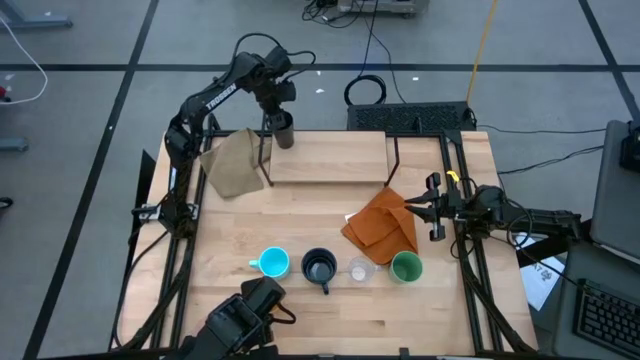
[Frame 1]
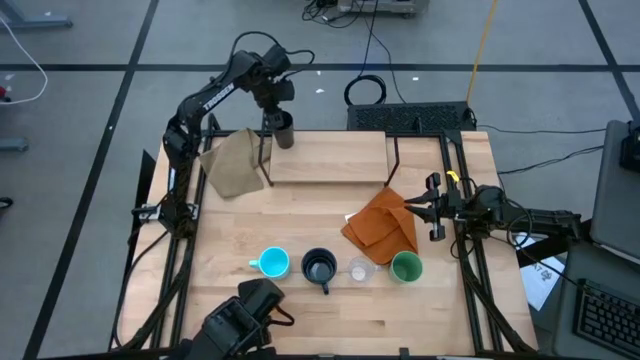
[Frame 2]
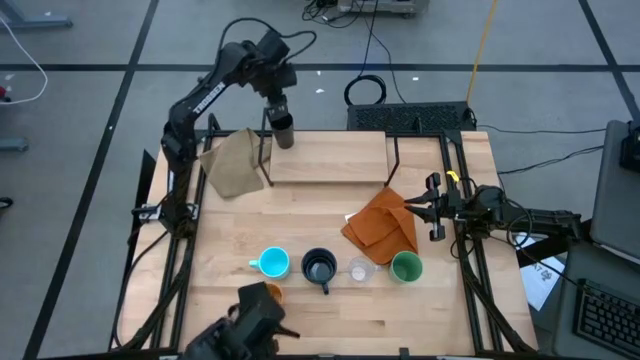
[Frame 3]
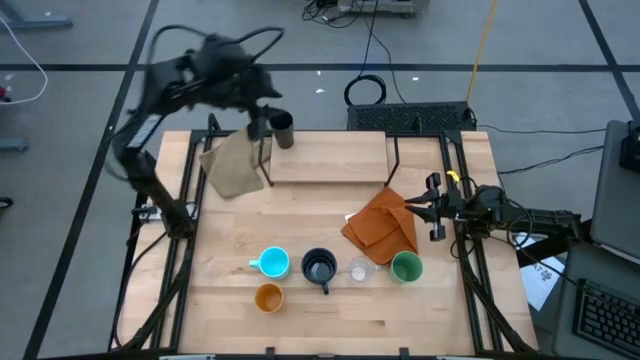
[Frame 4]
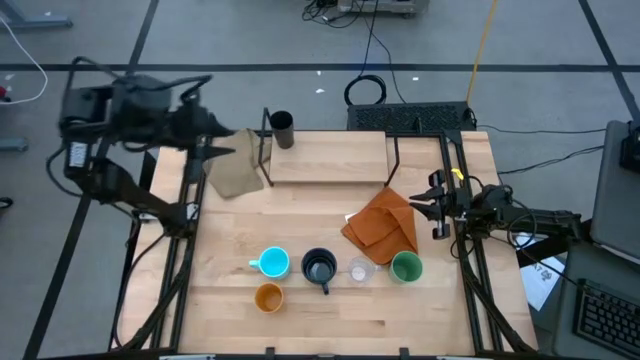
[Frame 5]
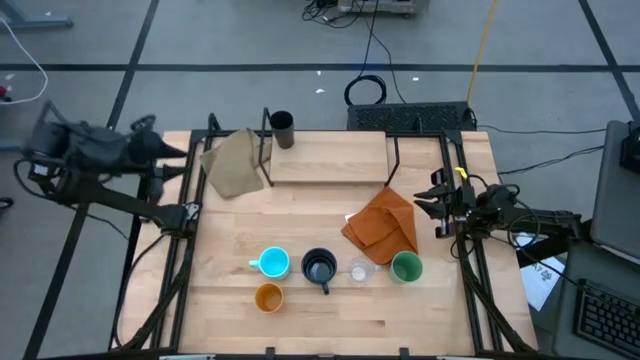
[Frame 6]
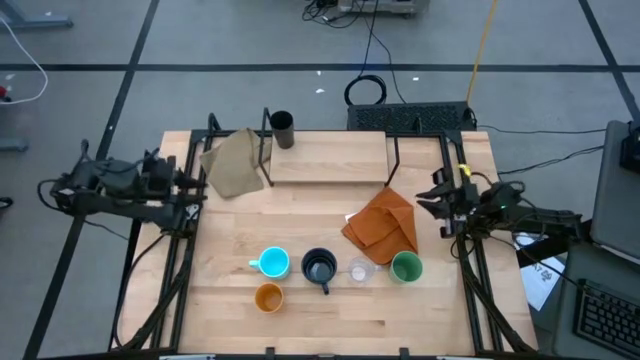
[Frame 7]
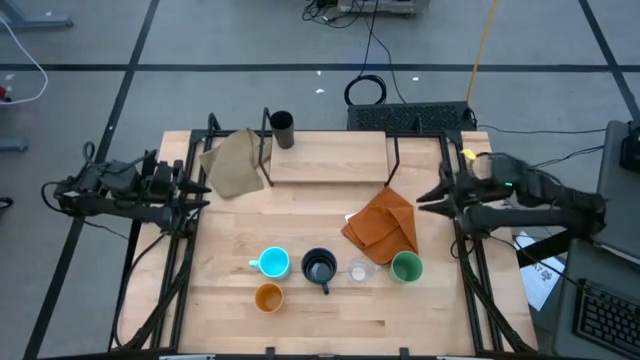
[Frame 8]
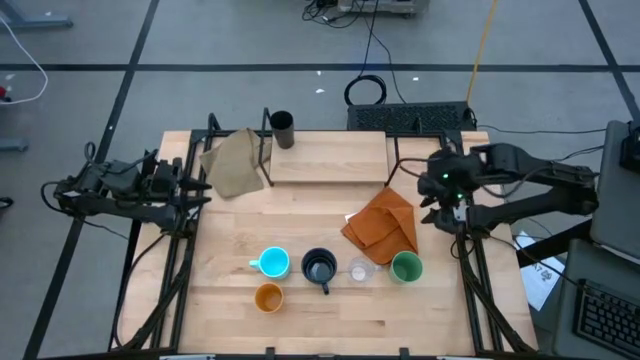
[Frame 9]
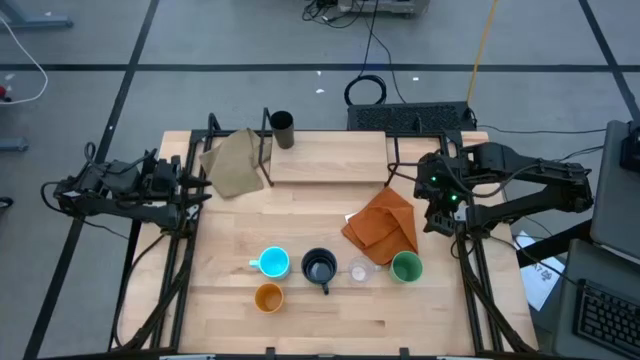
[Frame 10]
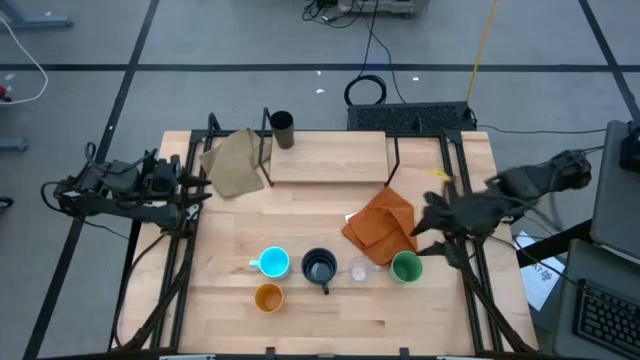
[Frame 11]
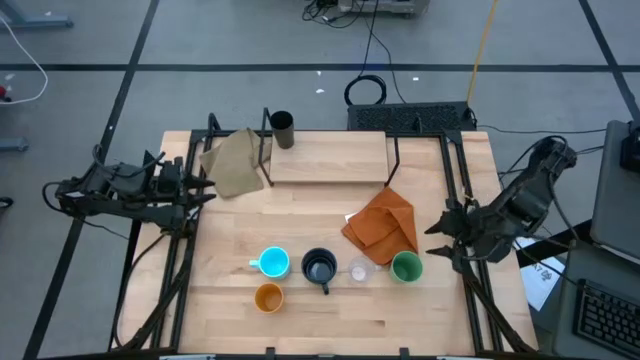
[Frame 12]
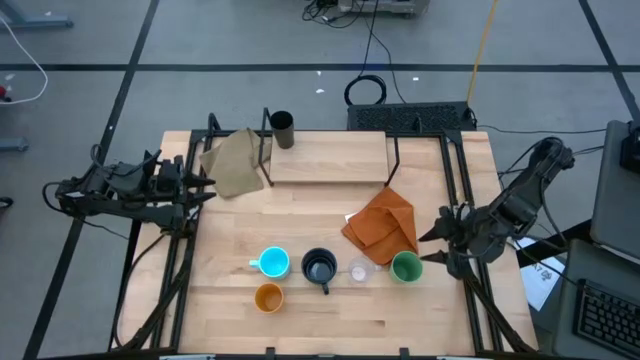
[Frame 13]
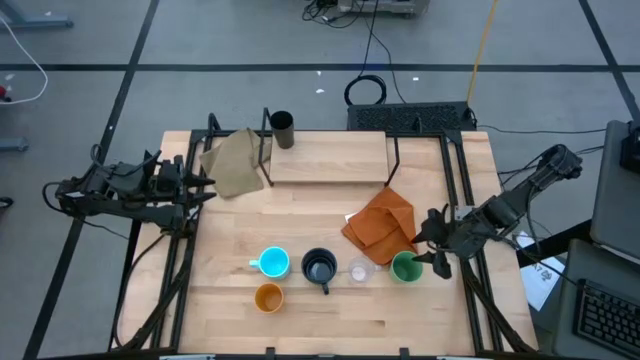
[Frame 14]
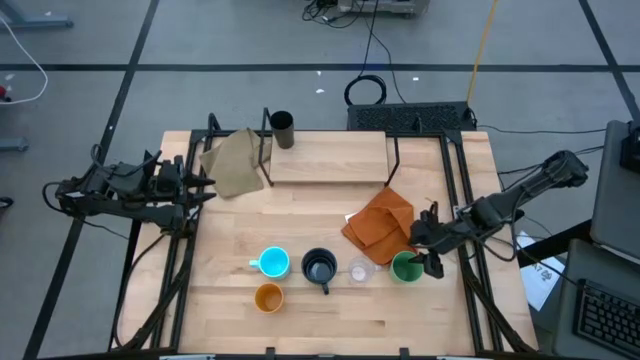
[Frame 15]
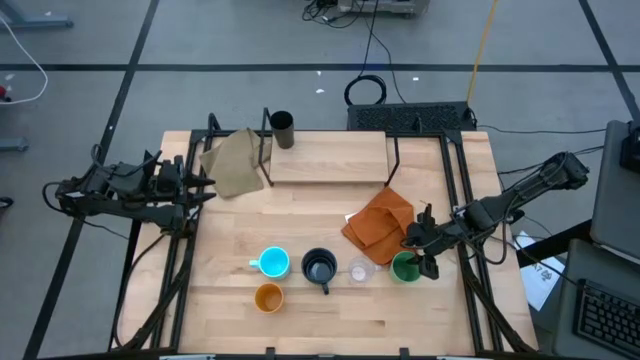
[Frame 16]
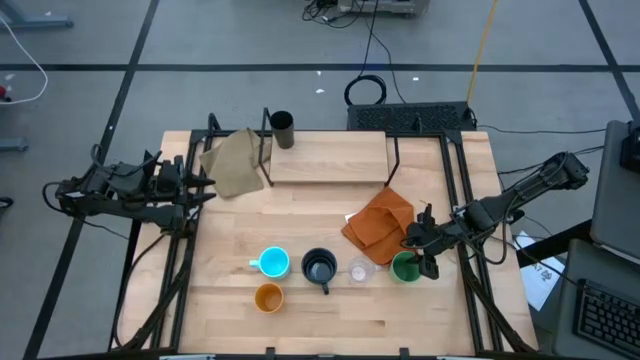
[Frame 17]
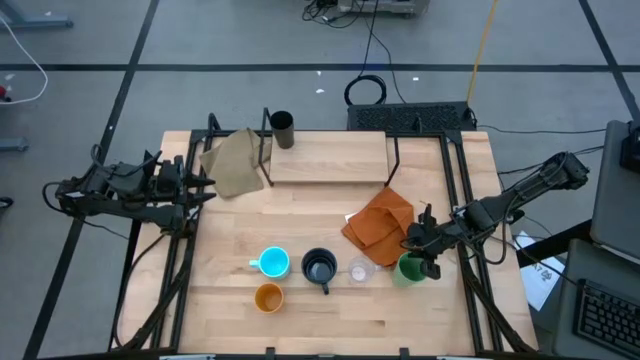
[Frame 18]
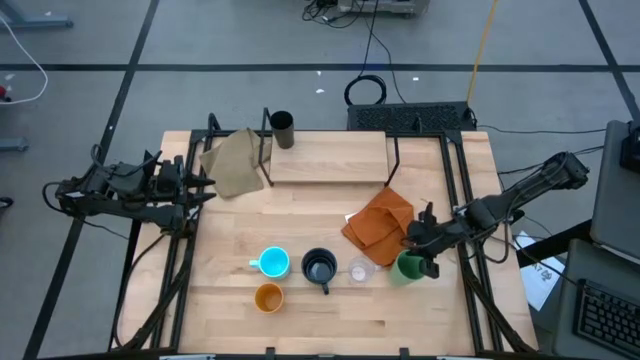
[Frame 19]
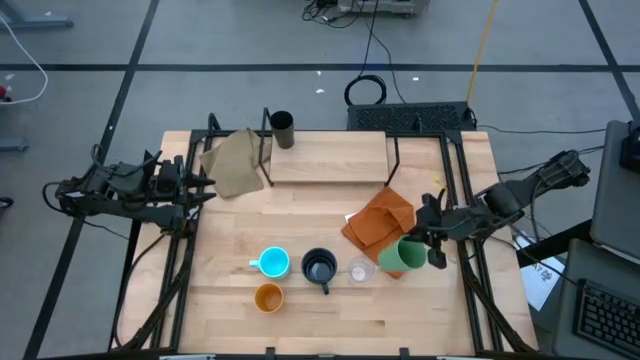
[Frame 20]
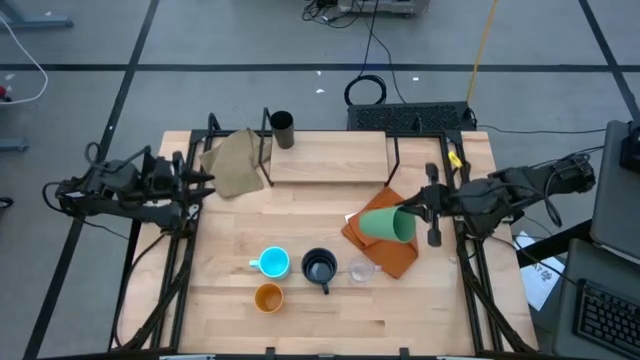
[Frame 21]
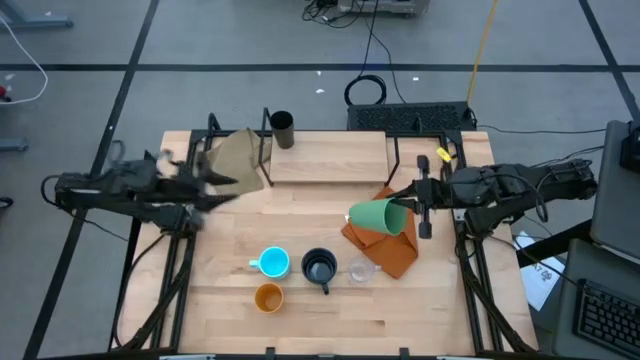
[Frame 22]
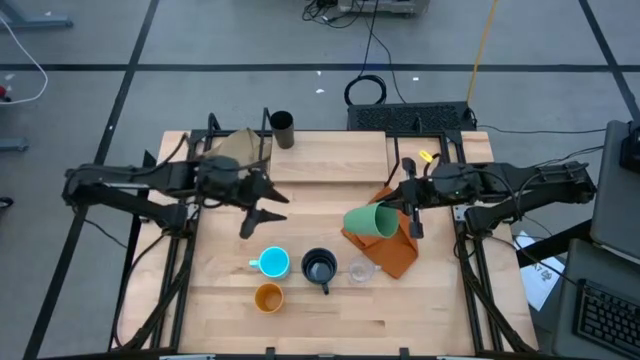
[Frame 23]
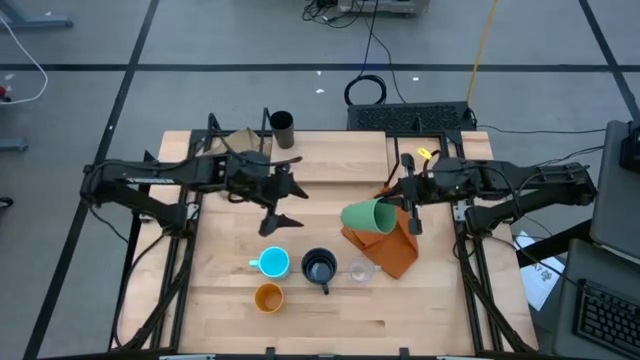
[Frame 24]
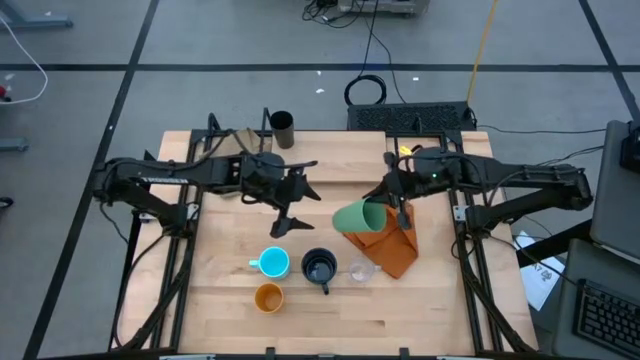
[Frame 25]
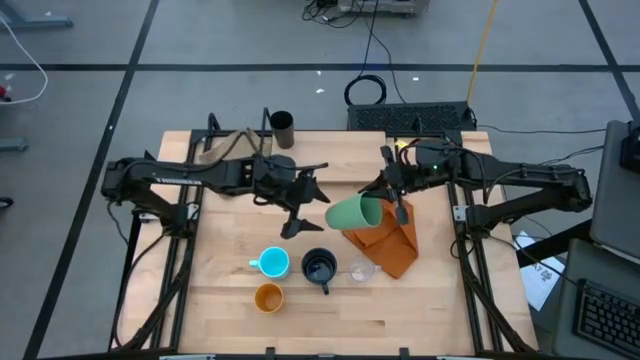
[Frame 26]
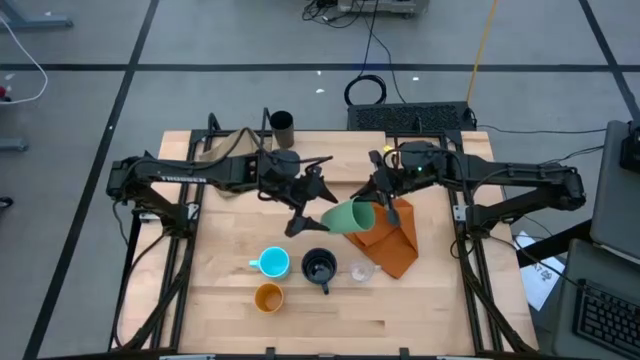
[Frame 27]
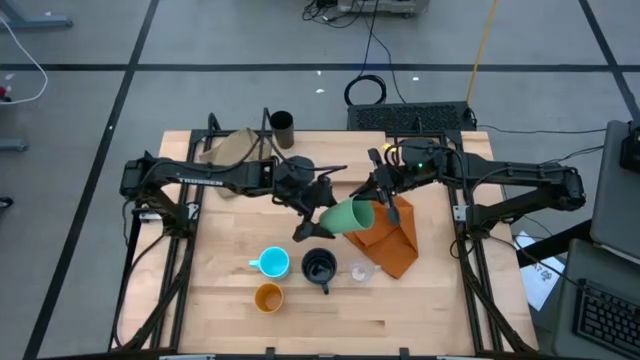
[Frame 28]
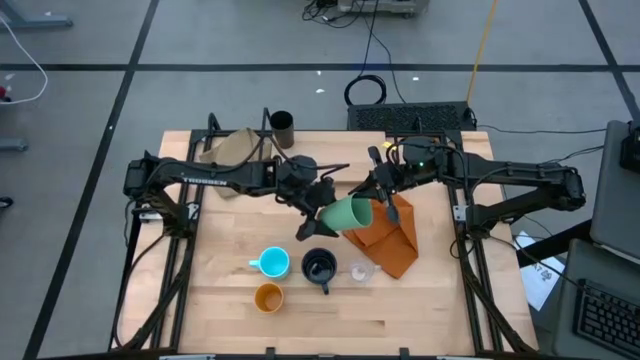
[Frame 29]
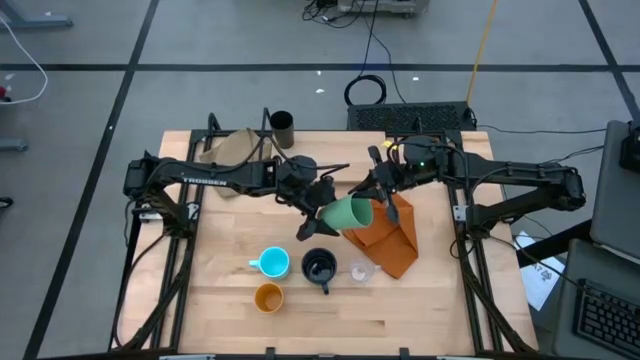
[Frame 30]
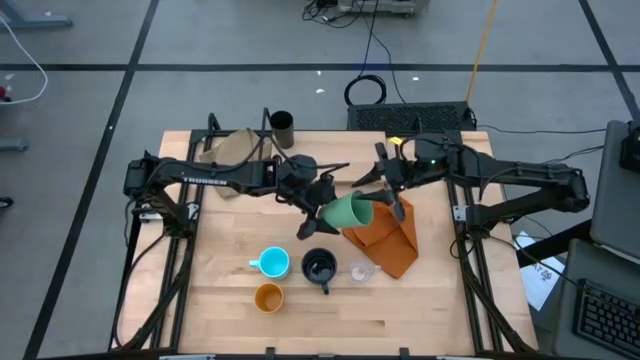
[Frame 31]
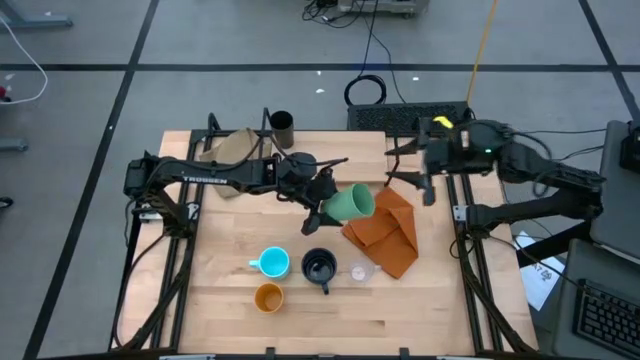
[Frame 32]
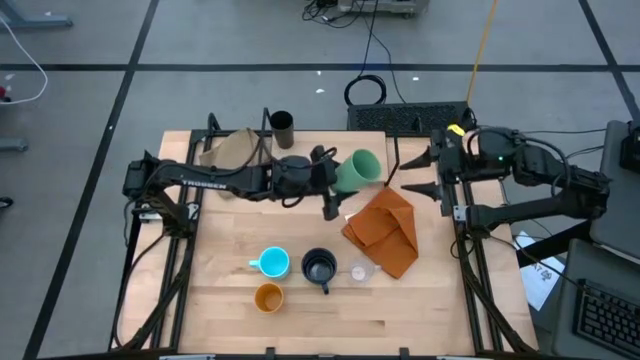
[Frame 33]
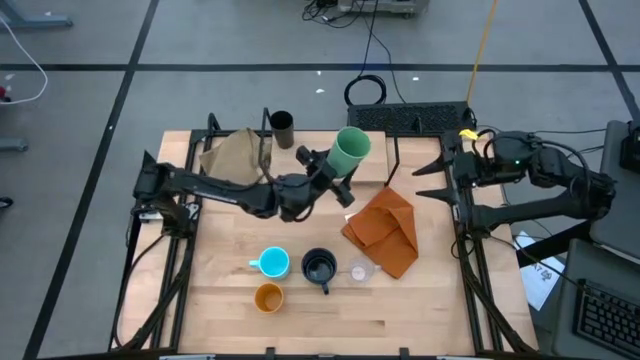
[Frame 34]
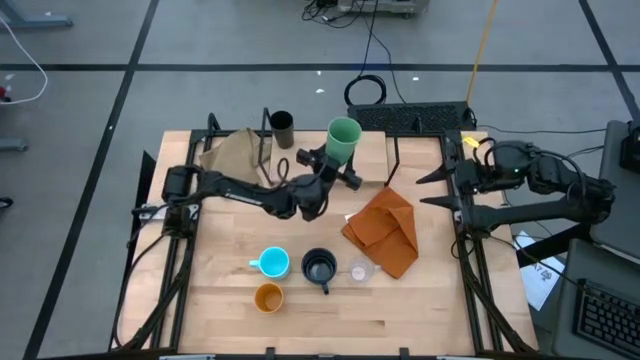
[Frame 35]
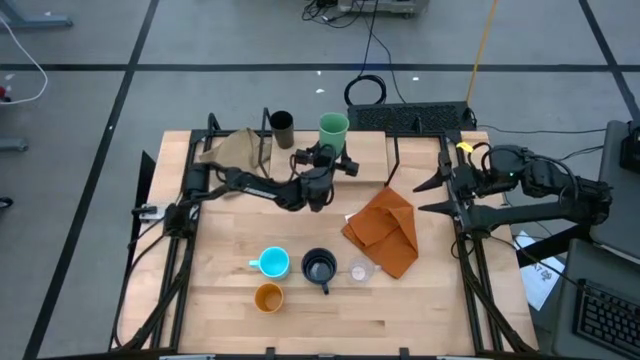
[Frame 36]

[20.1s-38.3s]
Task: Stack small to large cups/mugs on shelf
Put the green cup on the shelf
